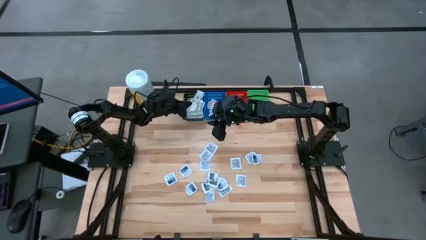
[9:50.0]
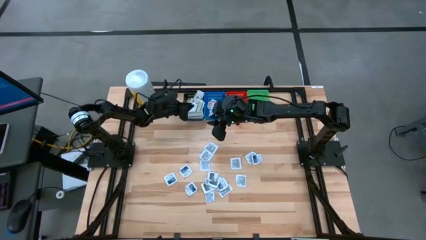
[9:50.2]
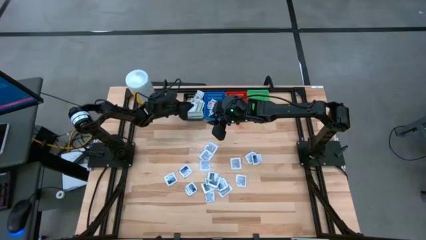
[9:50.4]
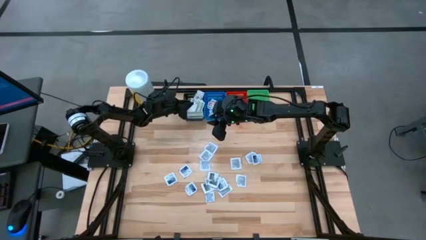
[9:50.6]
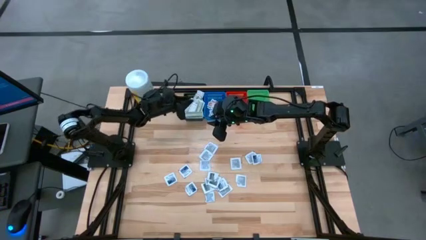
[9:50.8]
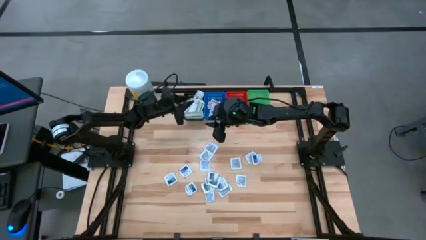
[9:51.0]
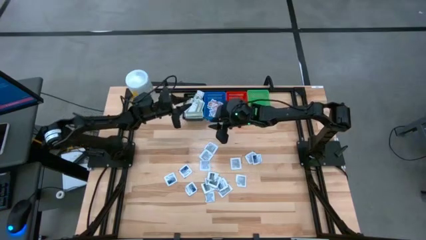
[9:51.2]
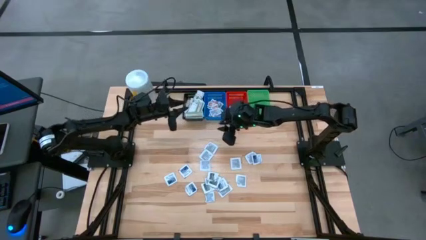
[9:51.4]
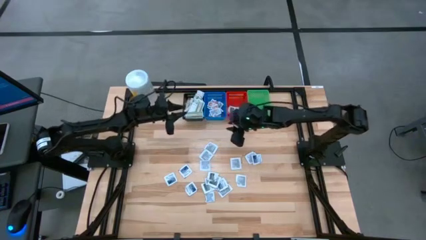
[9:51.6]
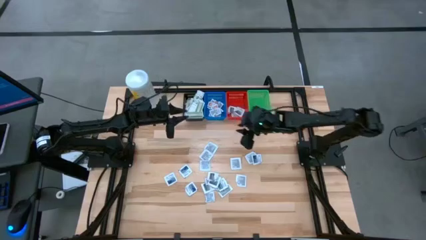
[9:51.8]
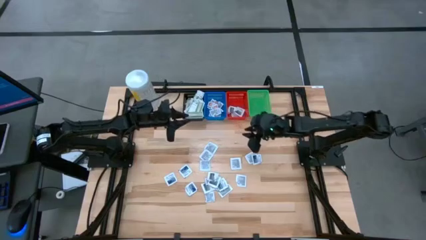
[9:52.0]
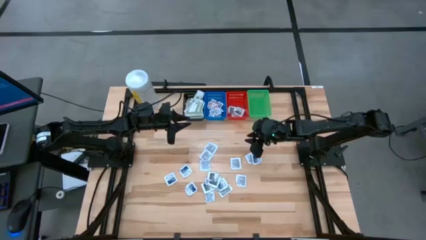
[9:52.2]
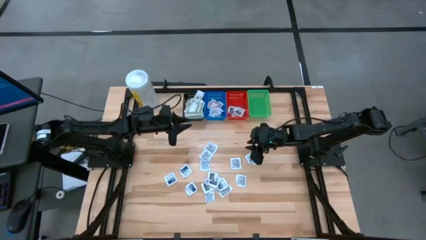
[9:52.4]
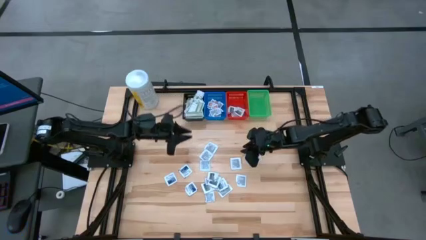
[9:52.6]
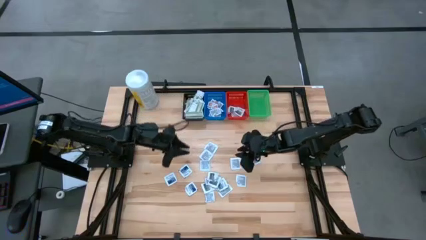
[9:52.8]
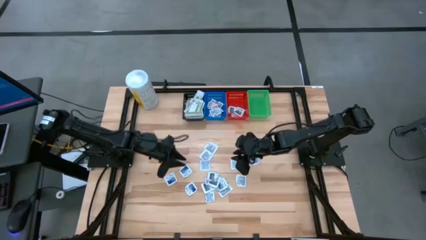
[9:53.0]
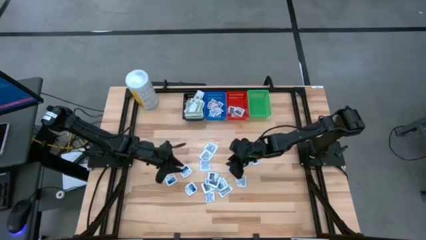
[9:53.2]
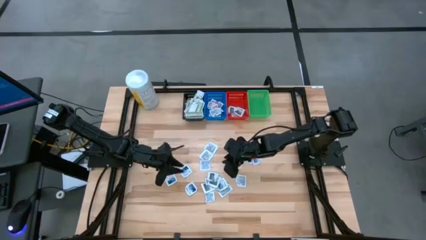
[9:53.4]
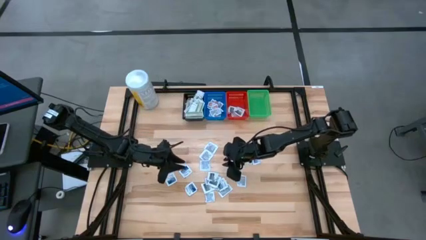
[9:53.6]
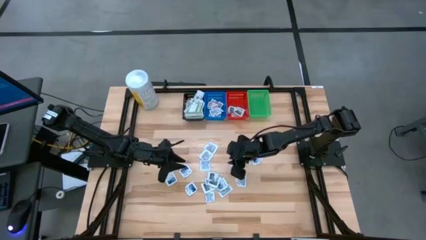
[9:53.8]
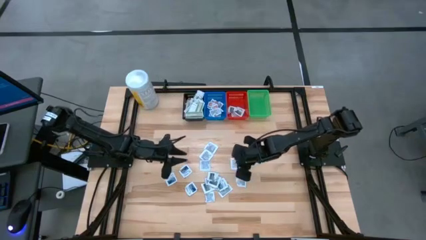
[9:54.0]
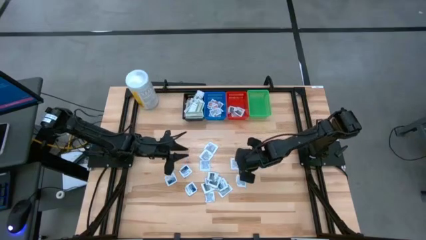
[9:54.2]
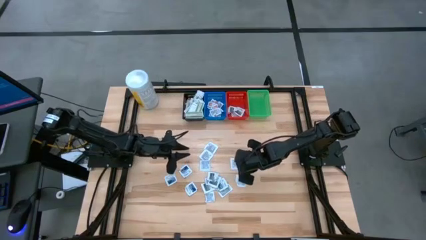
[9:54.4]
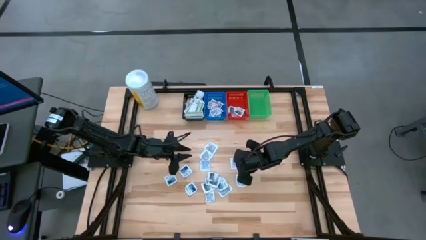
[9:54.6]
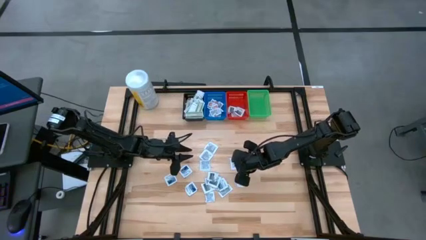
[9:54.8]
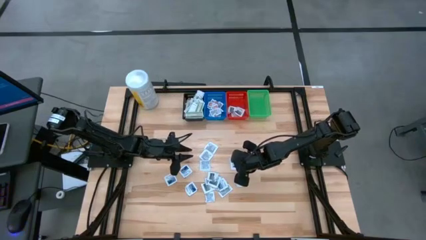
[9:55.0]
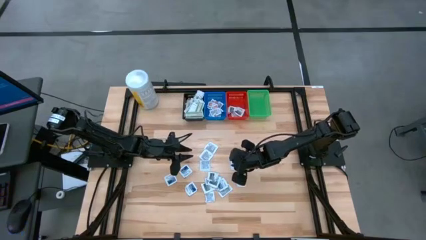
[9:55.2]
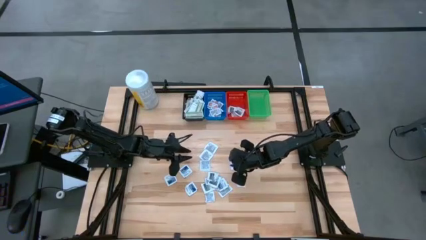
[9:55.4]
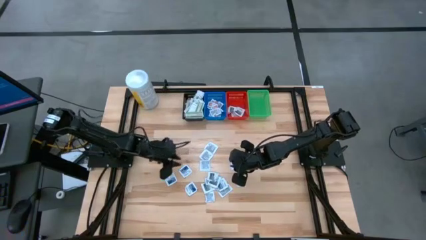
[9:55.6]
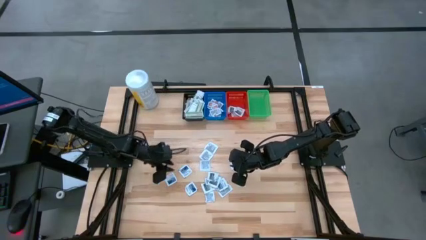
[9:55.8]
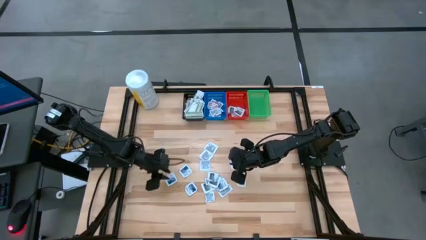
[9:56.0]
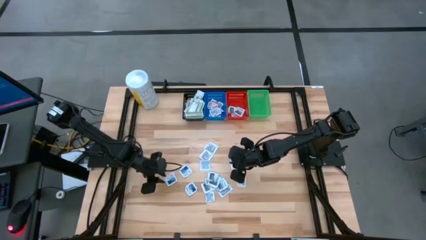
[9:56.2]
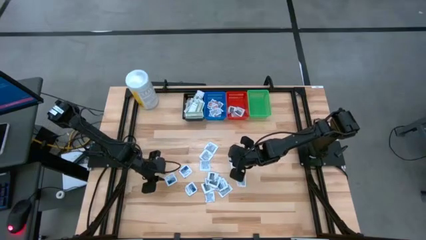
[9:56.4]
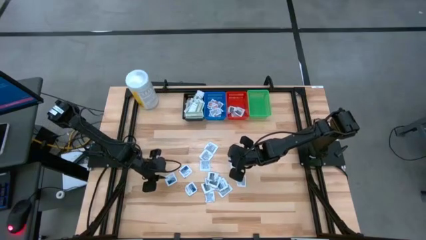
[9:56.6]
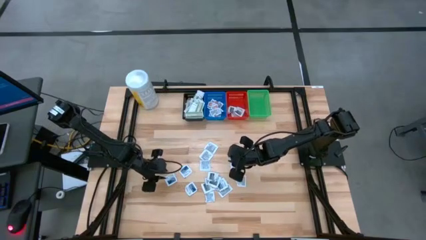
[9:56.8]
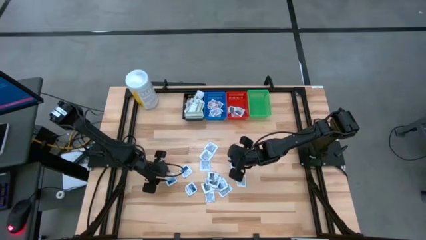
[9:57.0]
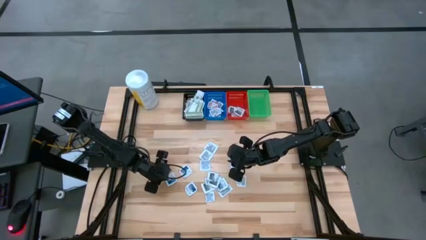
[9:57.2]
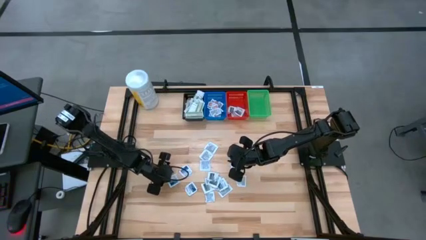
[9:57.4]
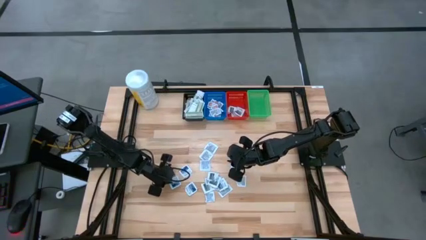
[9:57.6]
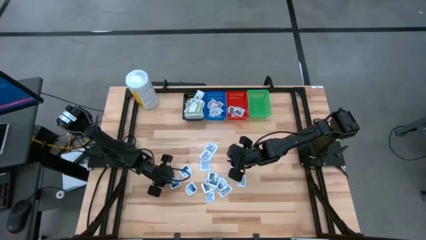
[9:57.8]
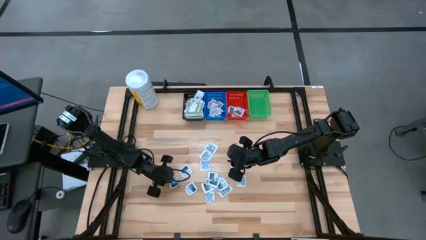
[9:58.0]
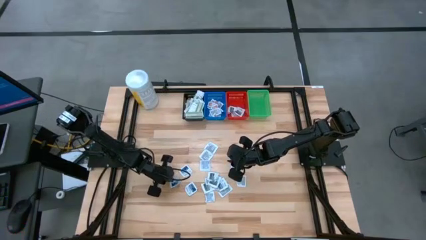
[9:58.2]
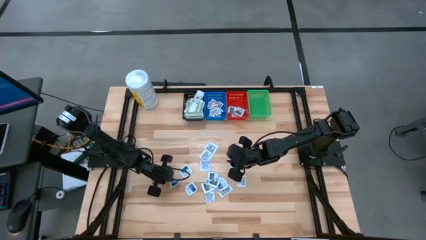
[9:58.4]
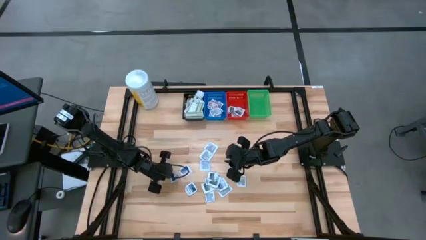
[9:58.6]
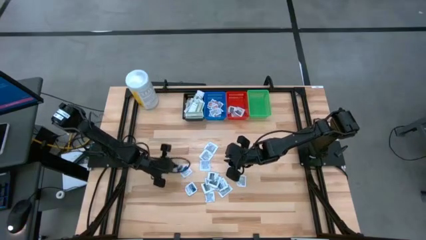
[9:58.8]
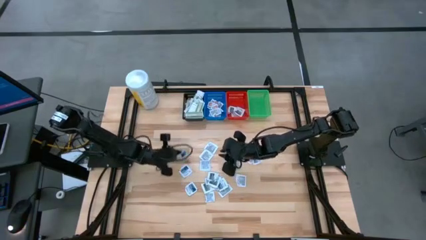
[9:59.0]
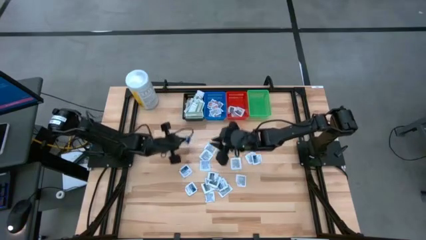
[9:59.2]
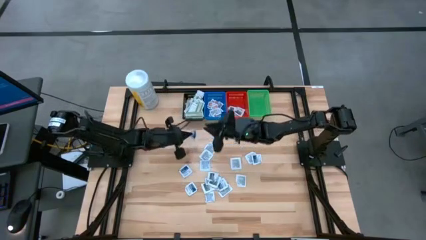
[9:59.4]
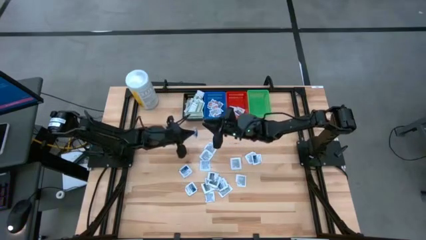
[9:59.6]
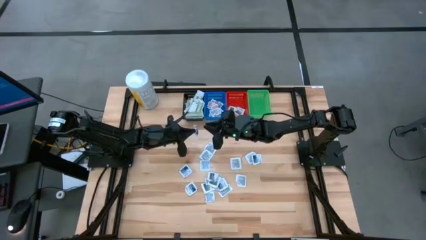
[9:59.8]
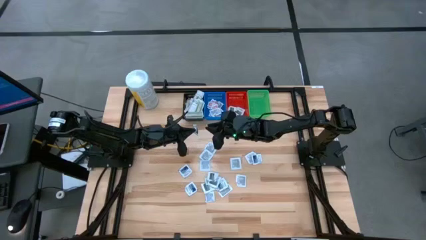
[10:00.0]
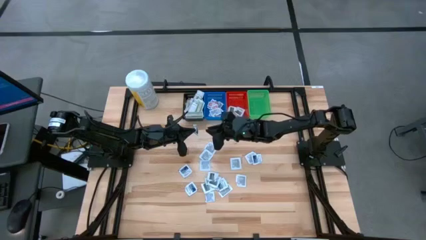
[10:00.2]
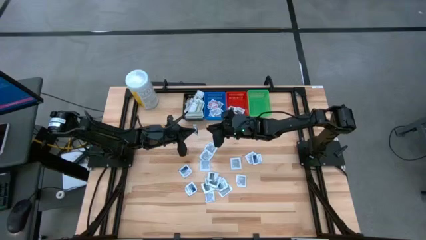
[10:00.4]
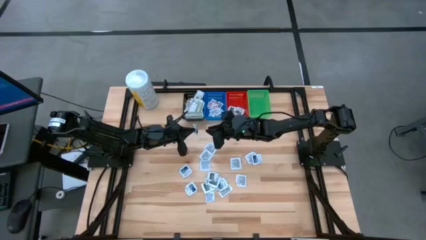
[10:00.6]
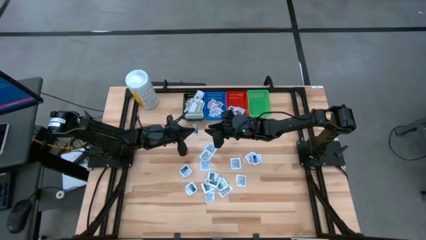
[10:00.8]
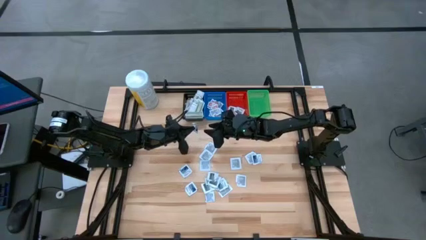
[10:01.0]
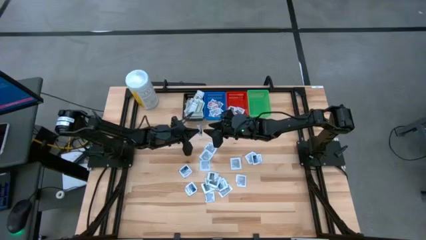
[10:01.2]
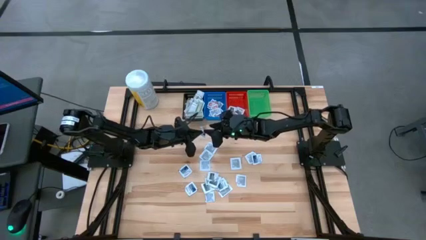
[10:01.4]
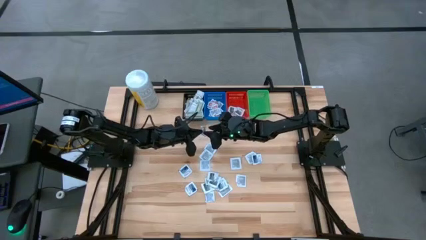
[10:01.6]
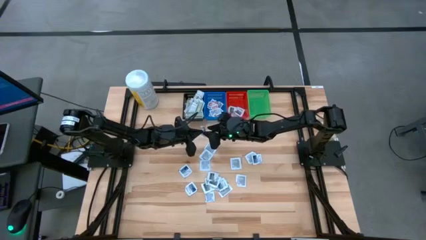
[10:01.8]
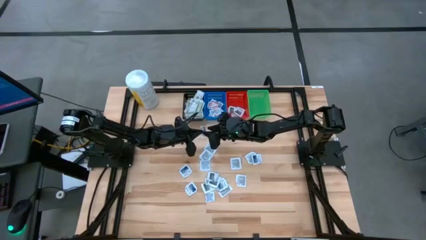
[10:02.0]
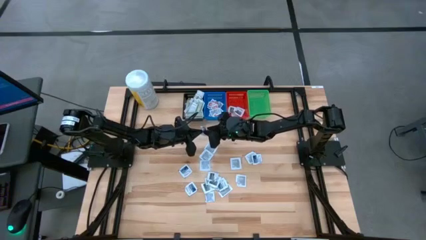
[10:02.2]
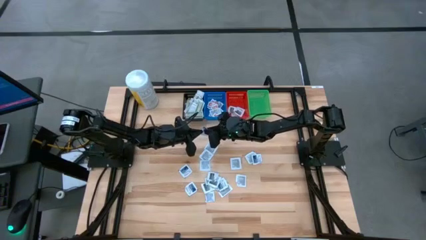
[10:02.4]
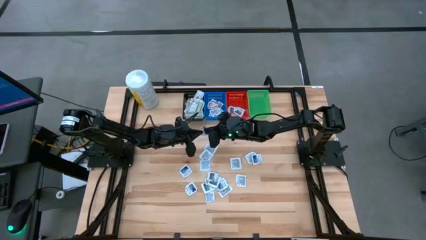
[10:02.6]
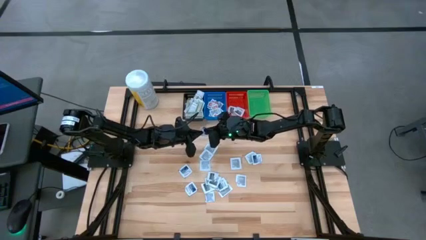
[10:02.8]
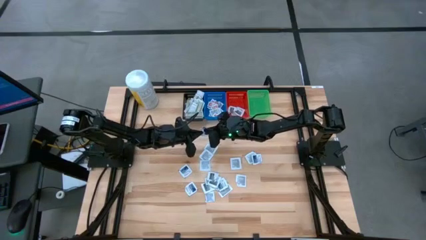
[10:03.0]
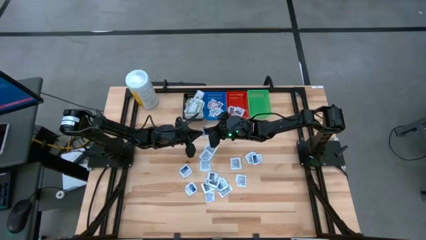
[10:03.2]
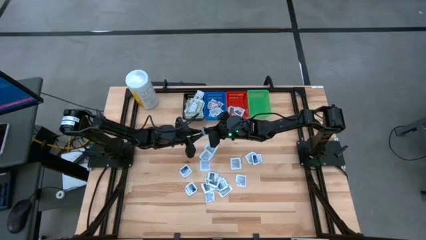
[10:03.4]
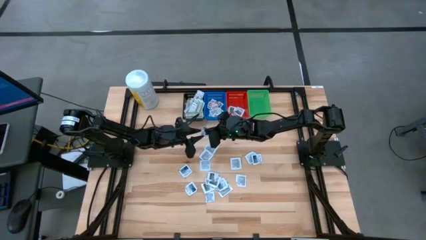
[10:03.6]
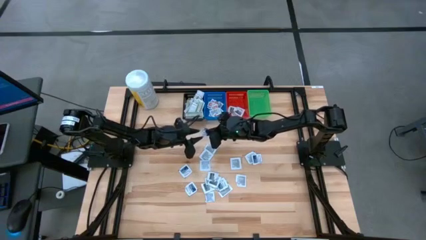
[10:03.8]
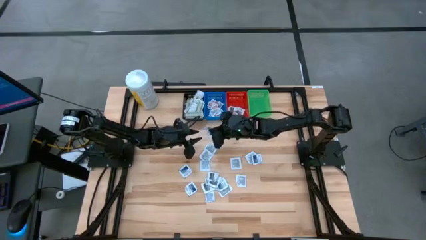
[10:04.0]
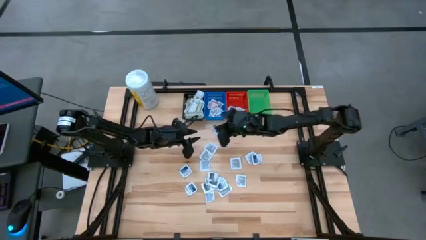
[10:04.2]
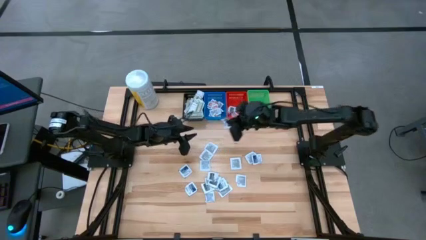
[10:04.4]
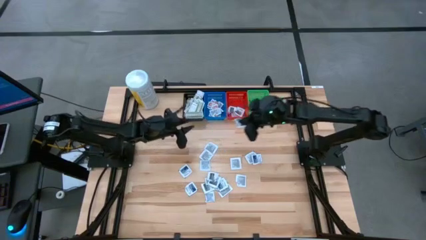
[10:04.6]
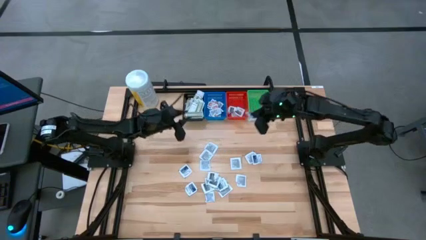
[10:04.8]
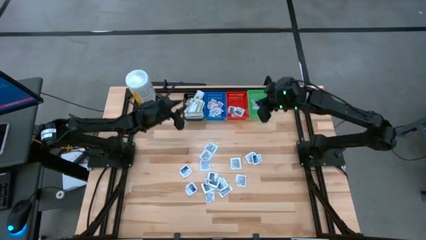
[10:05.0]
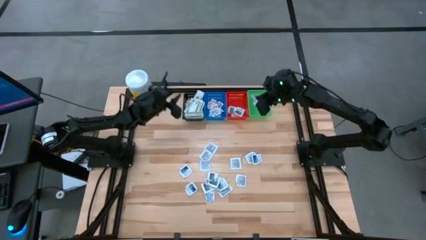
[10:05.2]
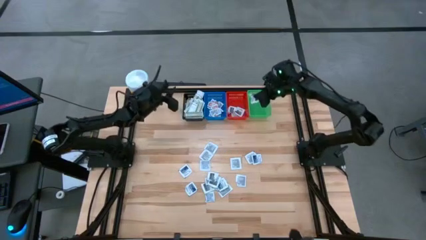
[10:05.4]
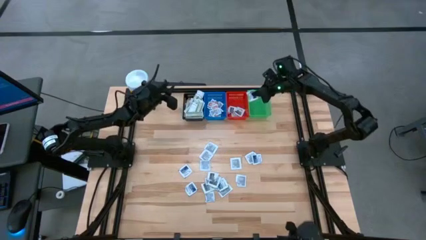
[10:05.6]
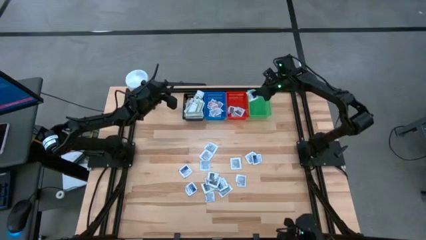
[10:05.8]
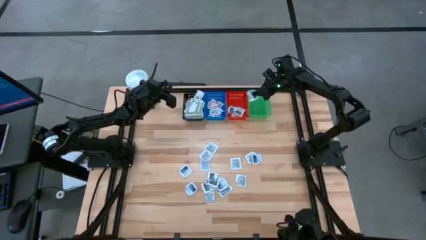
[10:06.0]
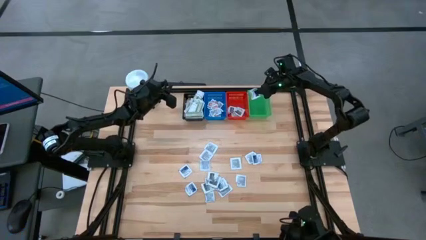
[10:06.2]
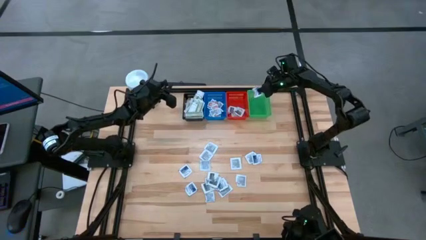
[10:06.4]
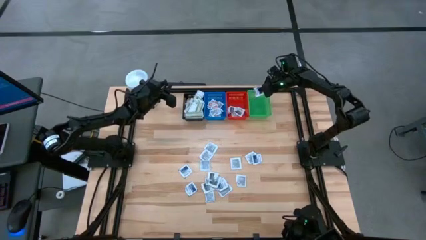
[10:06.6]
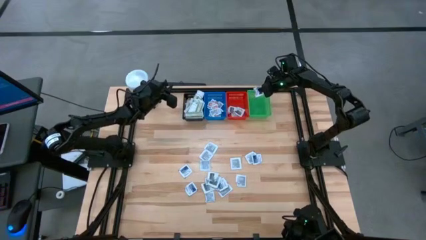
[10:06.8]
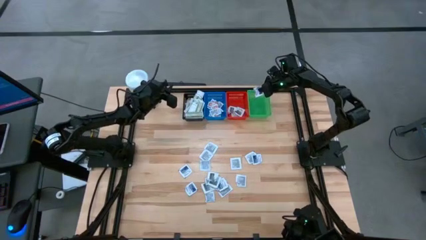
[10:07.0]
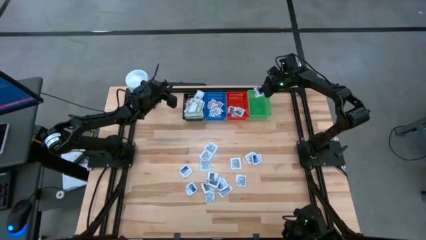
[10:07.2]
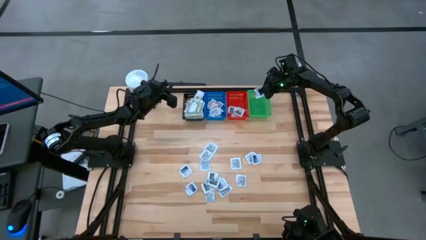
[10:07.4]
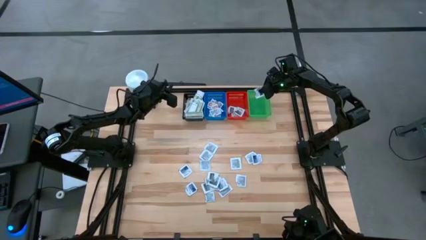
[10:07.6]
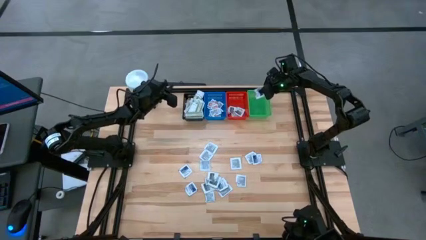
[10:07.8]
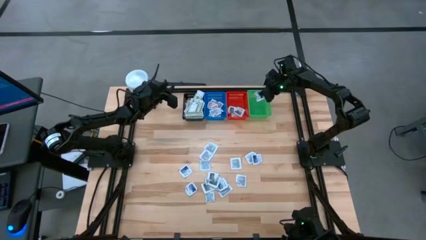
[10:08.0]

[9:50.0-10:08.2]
Task: Pick & Place First Aid Supplies
Put the blue alcohol pad in the green bin
